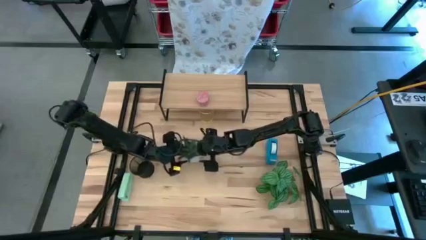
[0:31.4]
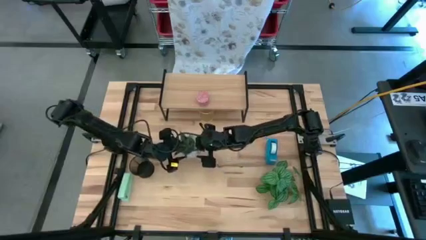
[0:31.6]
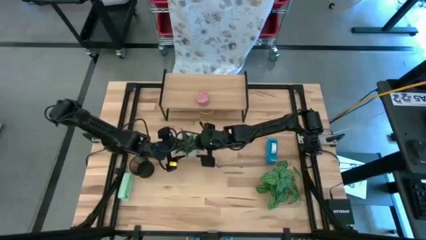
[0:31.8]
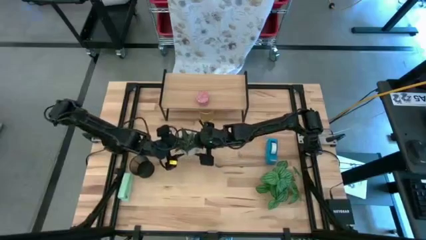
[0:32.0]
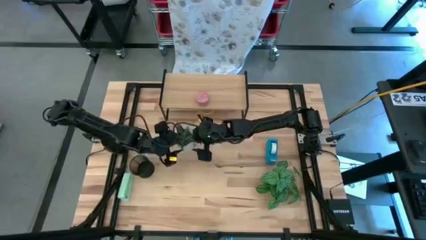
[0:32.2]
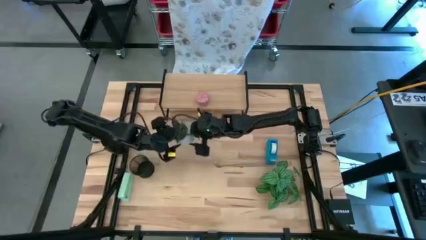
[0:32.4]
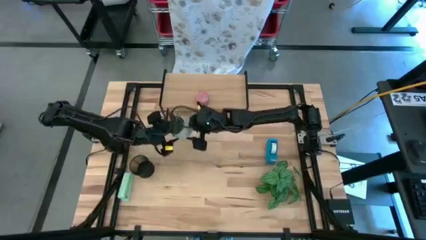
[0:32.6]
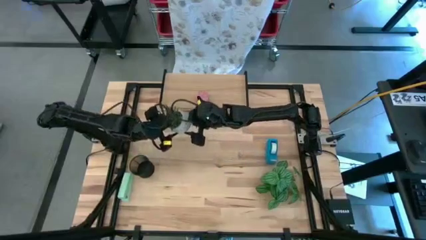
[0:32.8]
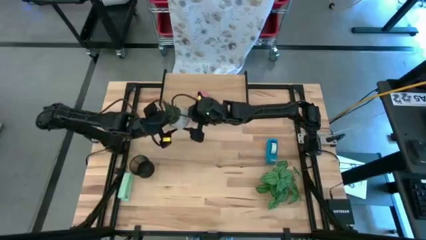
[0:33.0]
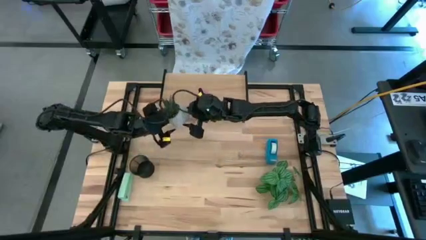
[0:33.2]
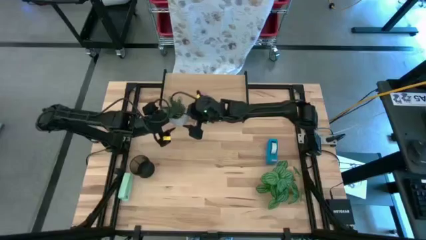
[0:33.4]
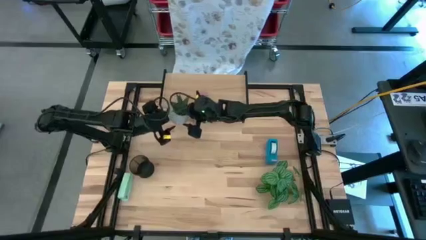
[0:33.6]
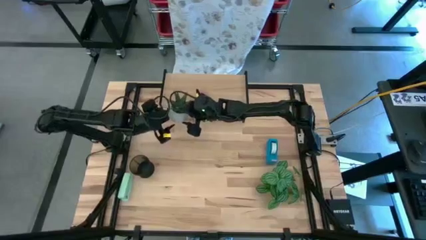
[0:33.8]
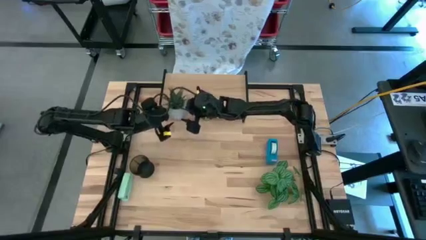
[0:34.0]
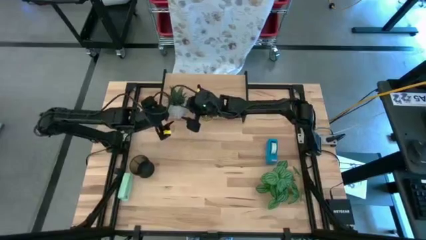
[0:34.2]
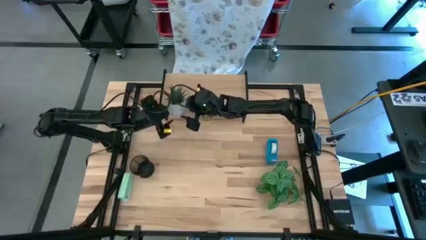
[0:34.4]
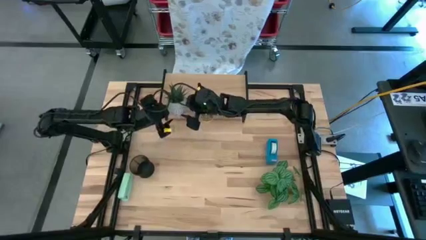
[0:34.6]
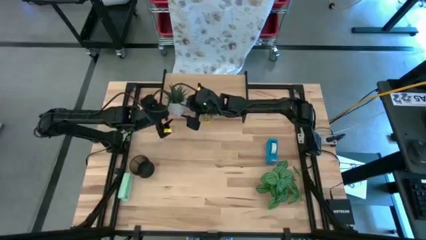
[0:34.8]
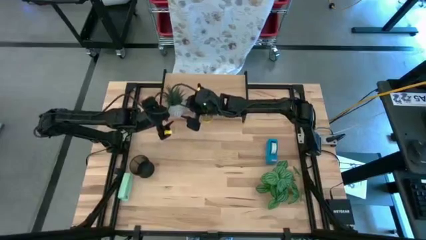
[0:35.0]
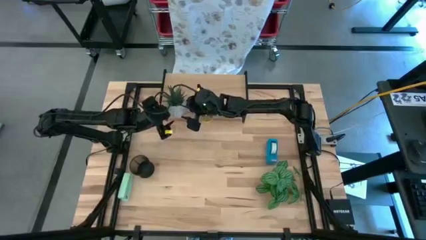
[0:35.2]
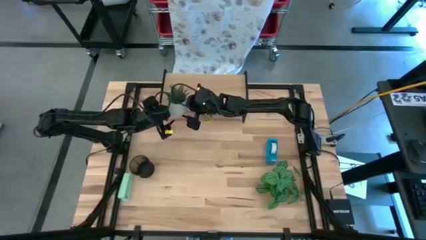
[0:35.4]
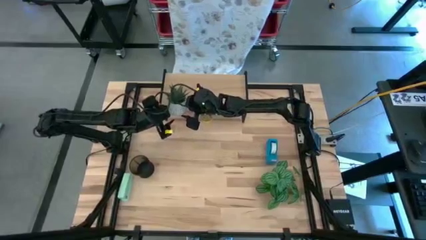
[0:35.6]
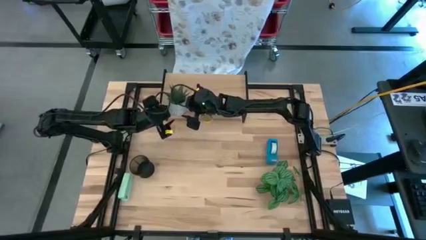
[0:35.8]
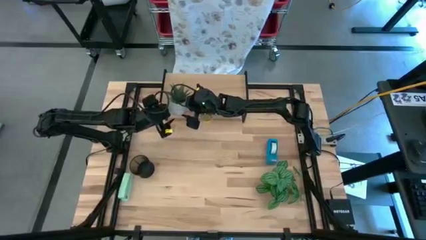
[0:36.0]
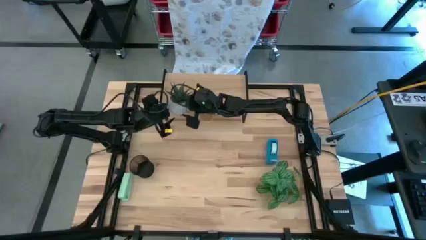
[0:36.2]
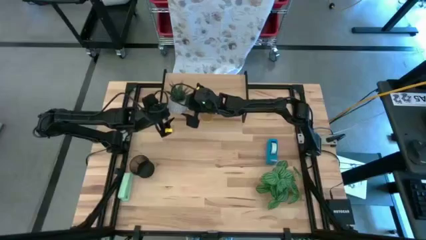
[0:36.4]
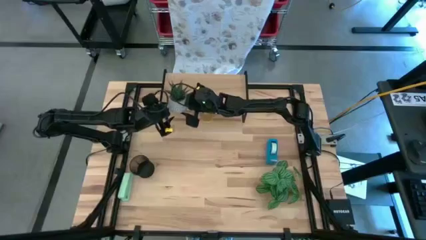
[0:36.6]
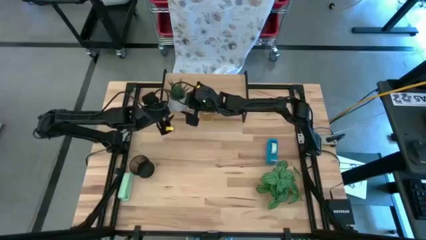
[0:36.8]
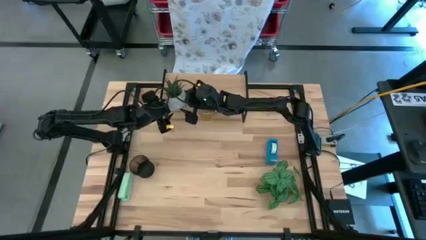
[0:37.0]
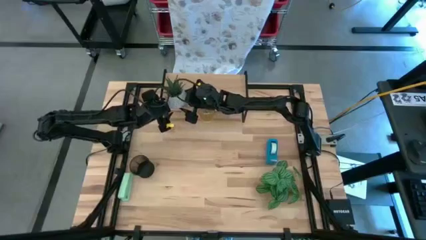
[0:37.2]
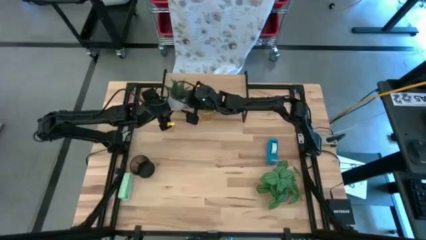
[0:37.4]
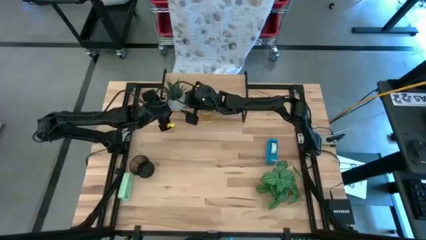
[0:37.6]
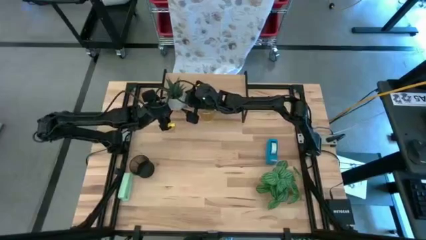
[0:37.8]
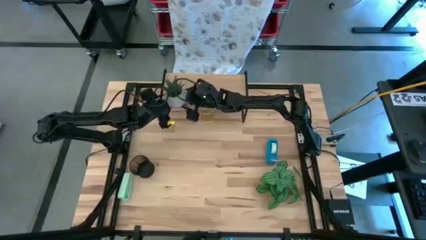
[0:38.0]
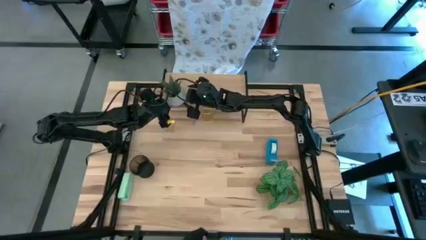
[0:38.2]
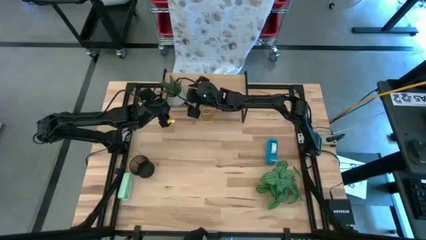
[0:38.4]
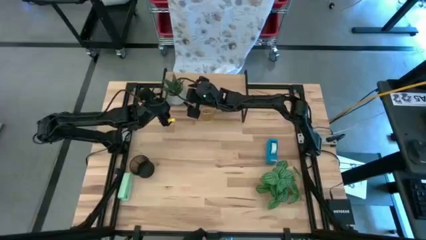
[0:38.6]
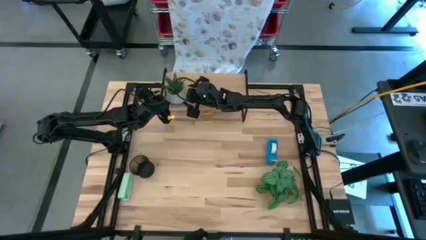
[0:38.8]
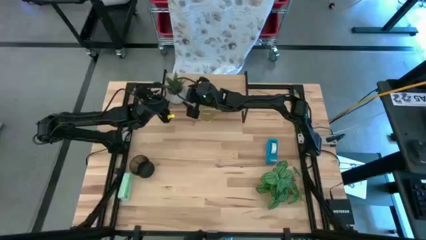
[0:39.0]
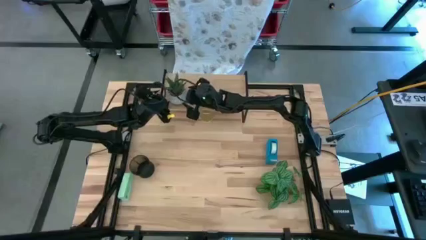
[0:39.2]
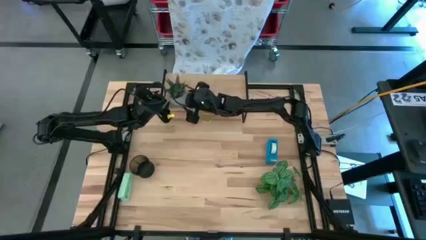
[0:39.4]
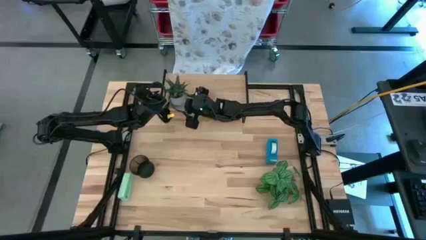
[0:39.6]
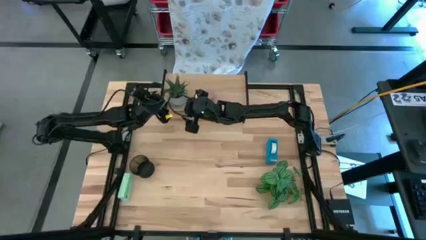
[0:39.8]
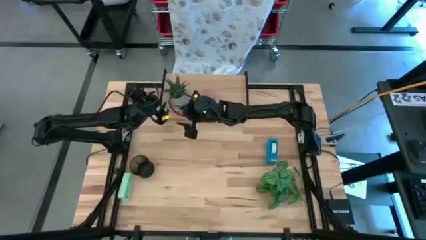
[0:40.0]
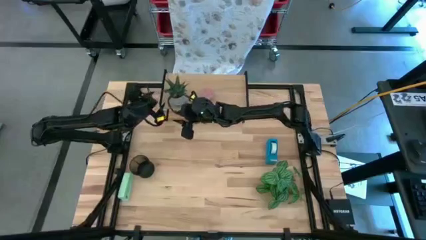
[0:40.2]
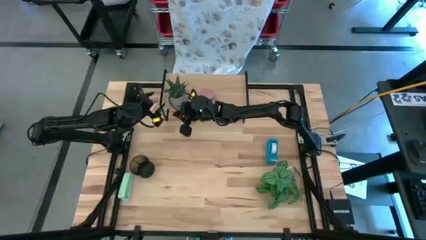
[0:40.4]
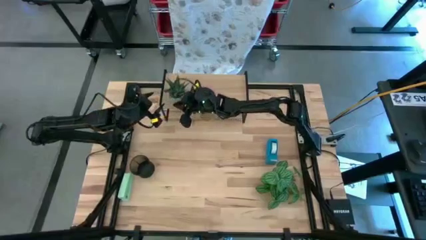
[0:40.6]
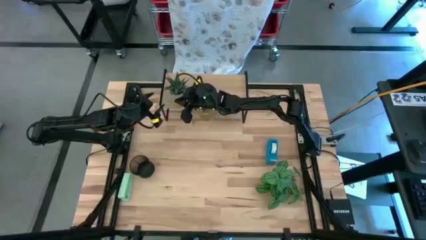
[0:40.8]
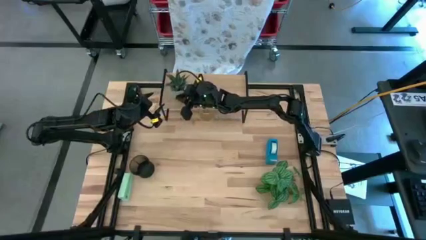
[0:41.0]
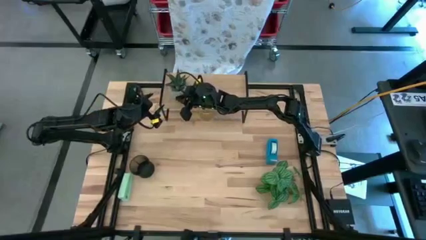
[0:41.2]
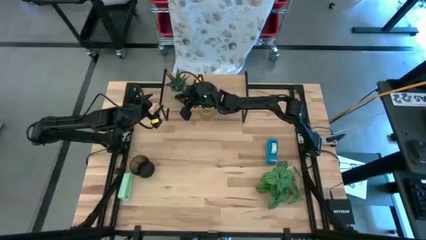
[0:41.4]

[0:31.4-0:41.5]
Task: Stock shelves
Put the top potted plant on the shelf

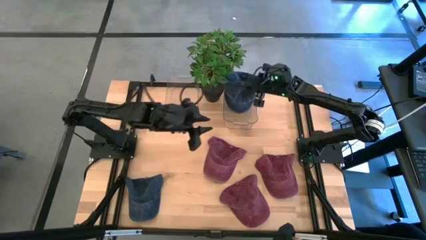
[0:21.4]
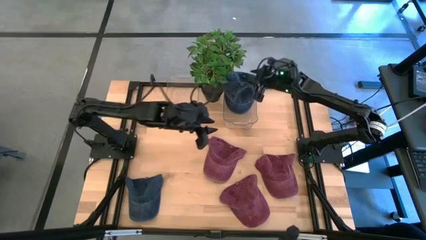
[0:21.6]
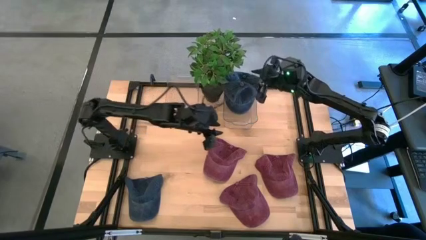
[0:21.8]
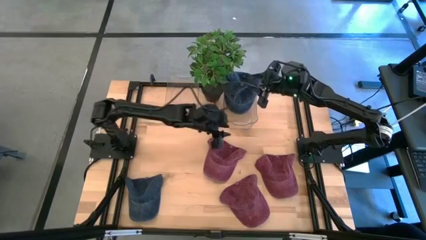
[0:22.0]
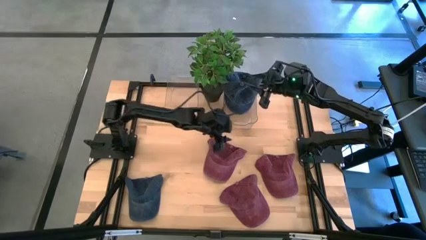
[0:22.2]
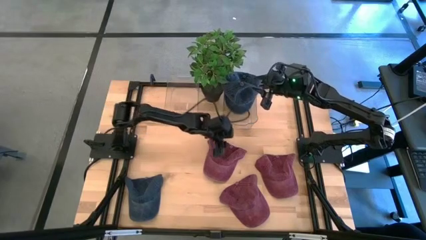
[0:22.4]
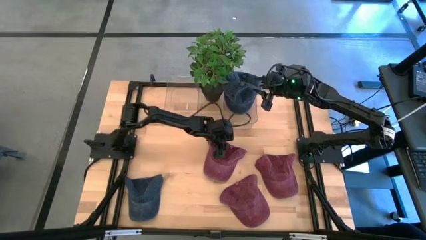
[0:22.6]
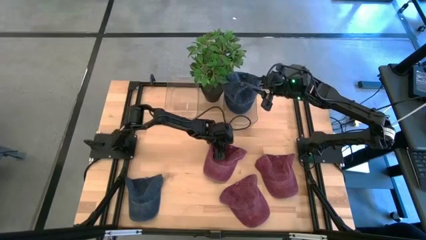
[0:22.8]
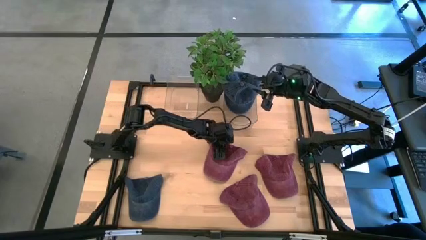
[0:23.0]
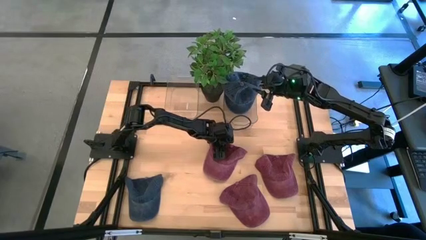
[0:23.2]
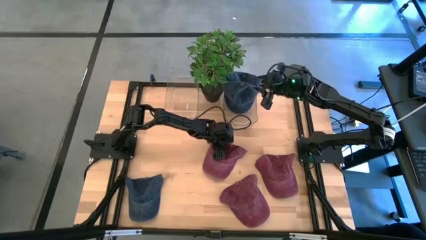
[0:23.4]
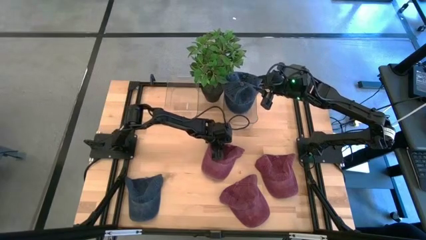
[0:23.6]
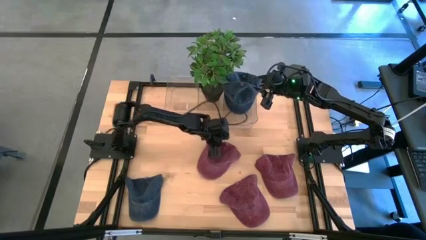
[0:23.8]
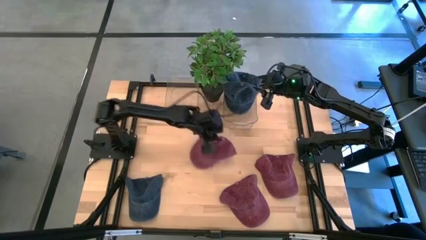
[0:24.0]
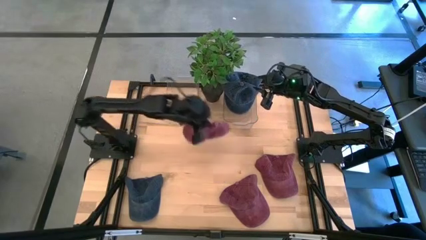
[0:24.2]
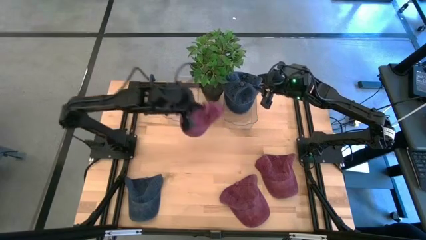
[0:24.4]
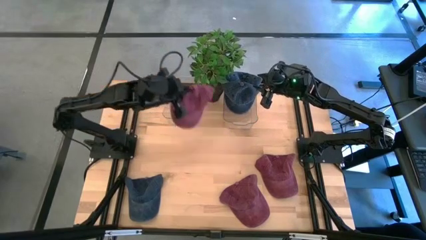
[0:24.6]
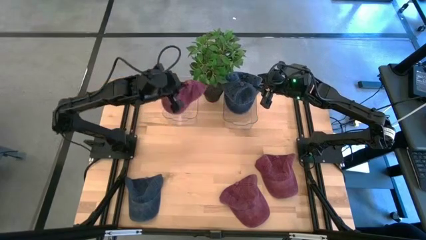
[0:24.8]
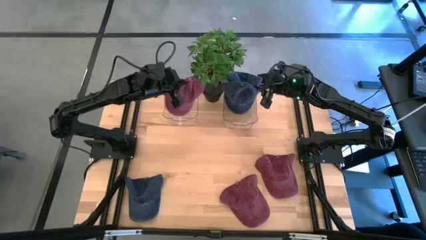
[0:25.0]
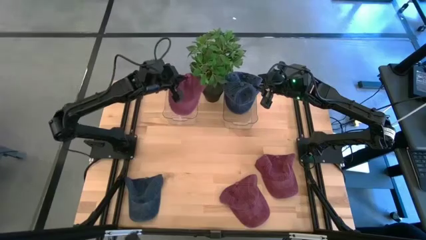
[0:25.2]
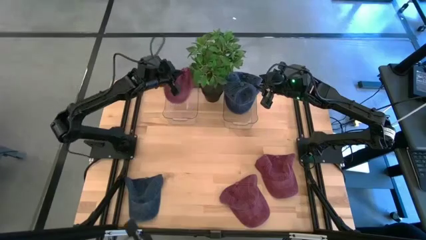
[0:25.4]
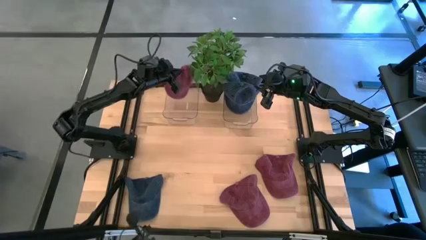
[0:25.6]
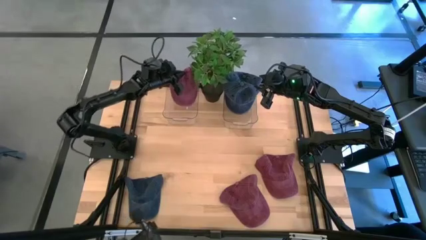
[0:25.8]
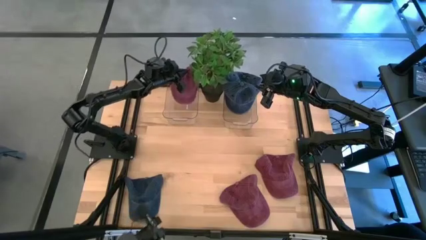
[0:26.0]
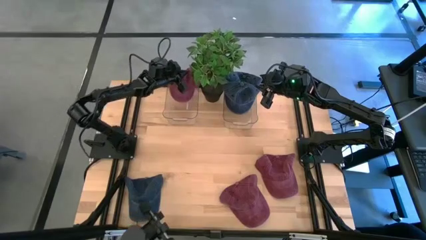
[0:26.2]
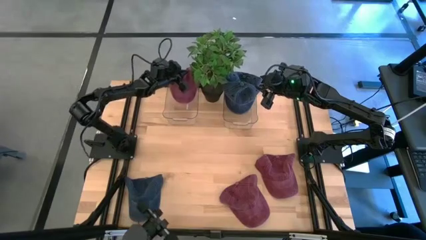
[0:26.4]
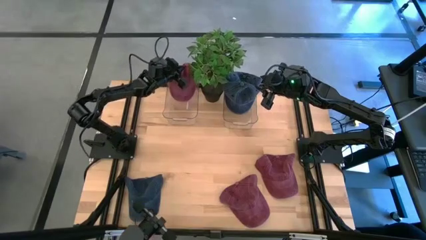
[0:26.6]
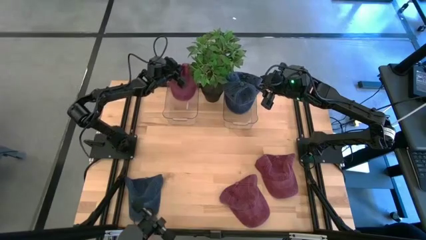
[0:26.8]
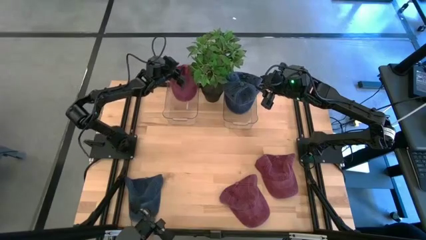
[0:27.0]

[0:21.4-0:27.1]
Task: Pick & Place hat
Put the top left red cap into the left transparent bin
